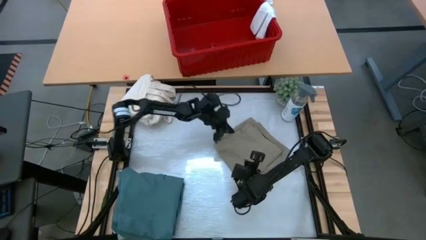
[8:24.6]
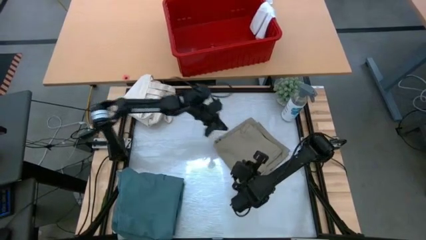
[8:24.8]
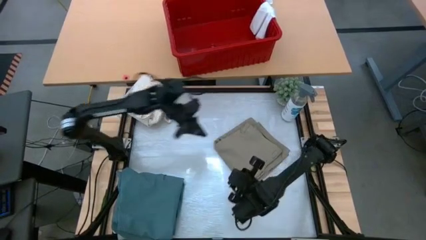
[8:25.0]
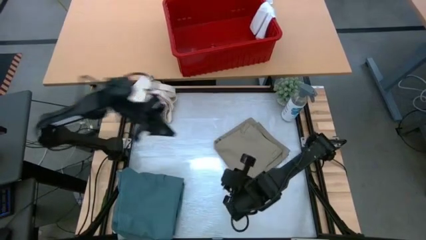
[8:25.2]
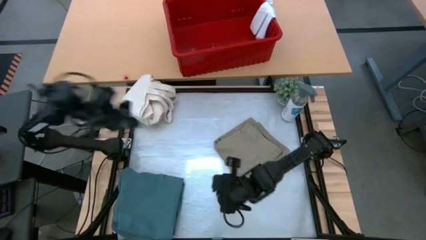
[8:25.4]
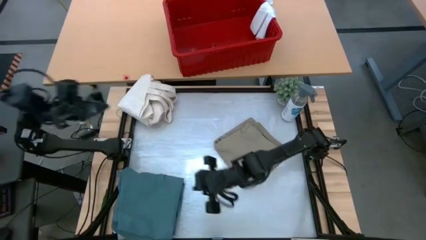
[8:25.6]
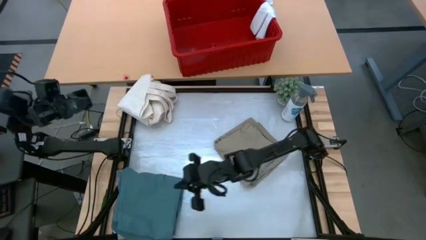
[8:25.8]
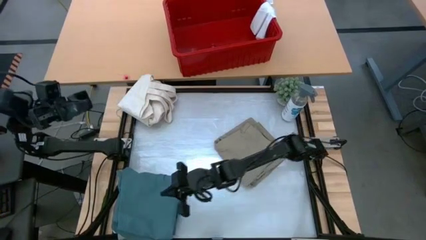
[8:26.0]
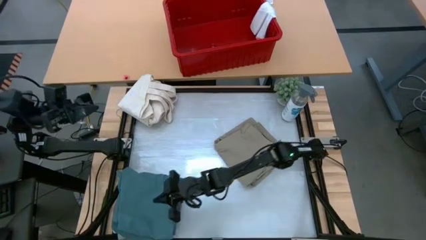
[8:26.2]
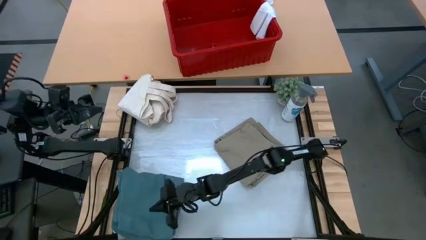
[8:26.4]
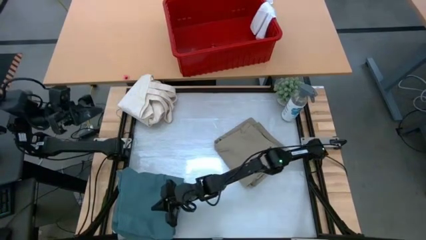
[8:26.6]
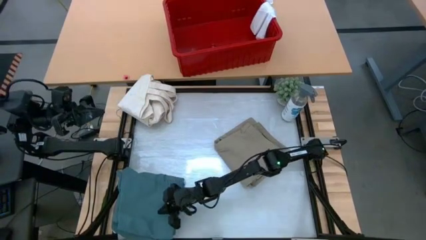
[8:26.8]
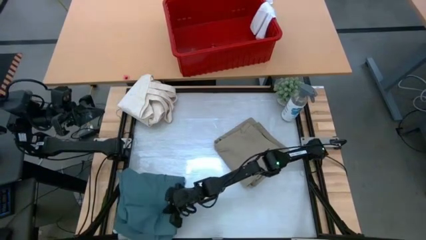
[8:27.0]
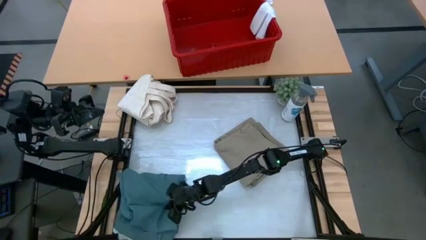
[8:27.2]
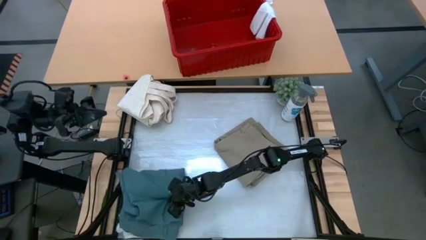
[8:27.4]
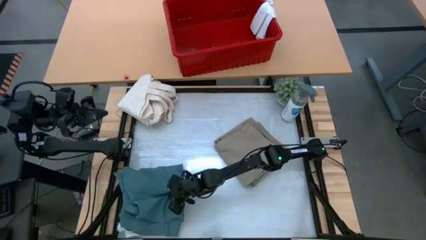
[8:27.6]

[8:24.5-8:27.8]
Task: Fold Laundry from Bin
Adjust the stacked clothes

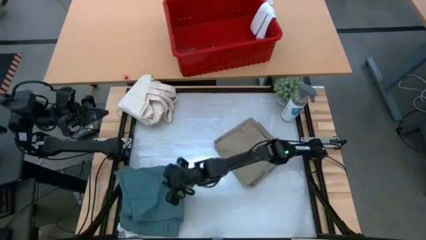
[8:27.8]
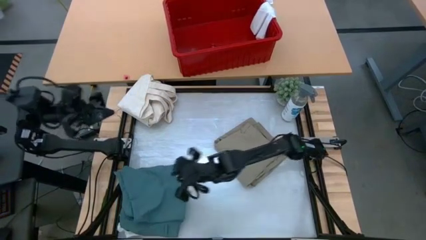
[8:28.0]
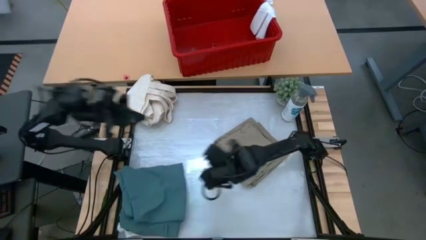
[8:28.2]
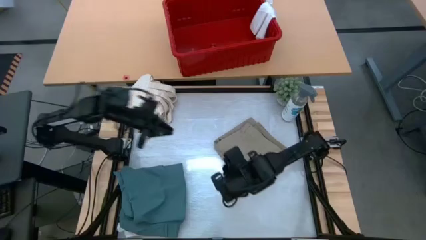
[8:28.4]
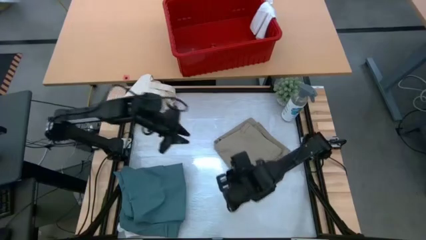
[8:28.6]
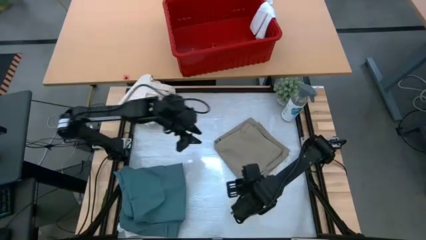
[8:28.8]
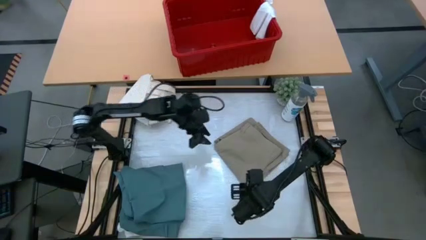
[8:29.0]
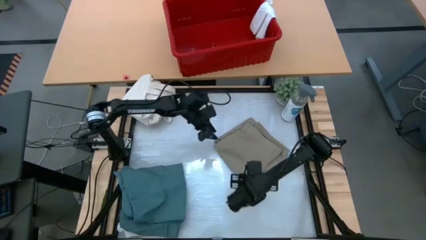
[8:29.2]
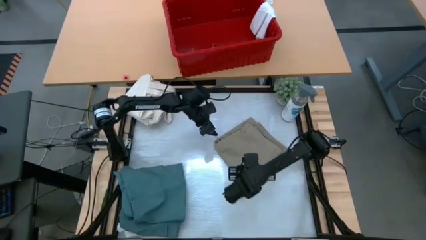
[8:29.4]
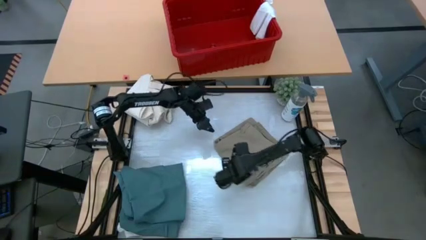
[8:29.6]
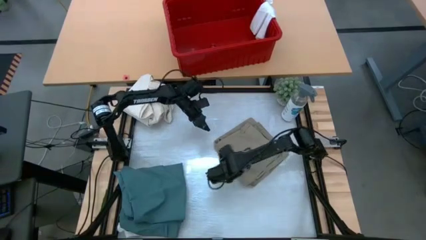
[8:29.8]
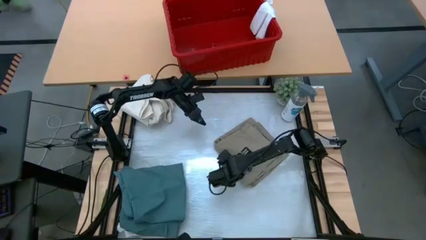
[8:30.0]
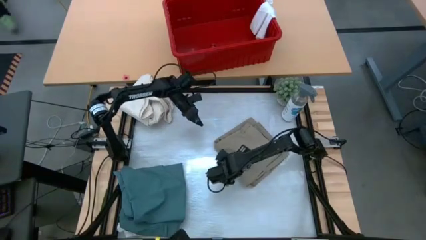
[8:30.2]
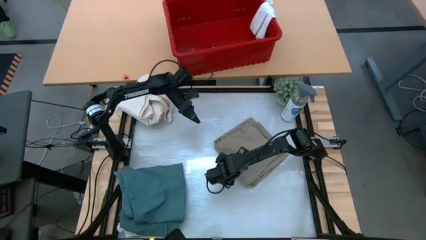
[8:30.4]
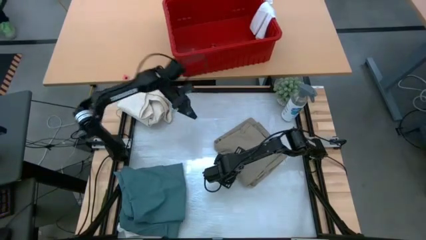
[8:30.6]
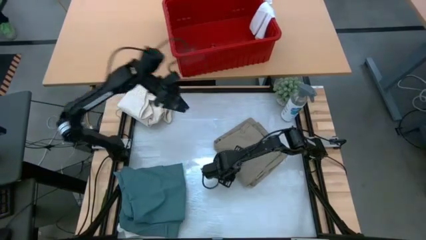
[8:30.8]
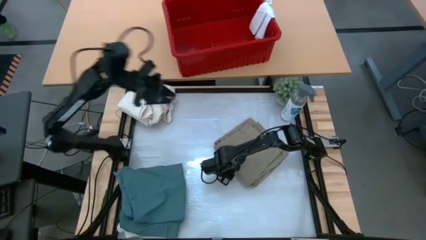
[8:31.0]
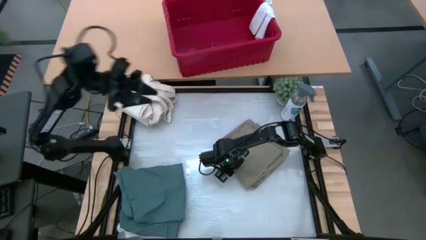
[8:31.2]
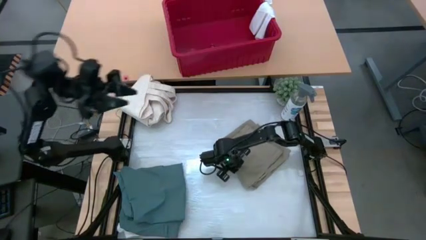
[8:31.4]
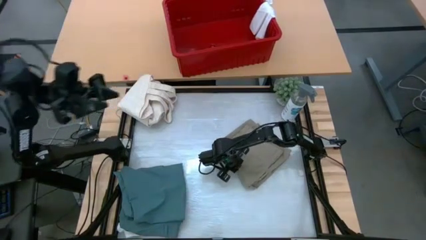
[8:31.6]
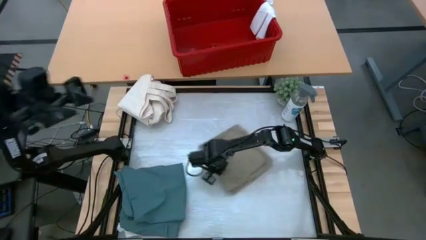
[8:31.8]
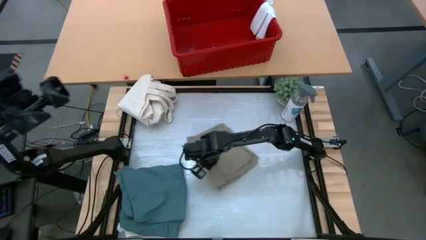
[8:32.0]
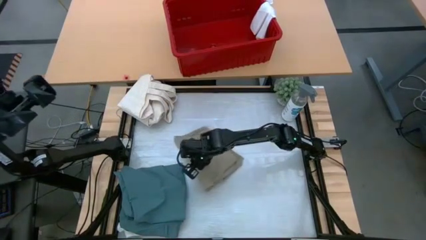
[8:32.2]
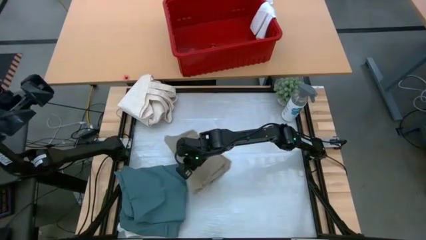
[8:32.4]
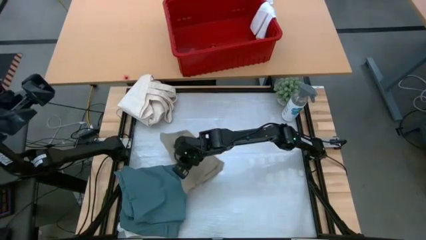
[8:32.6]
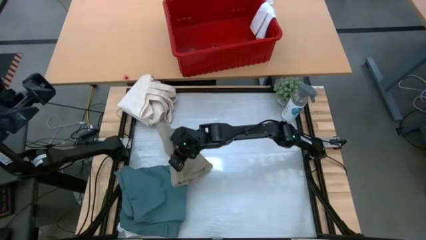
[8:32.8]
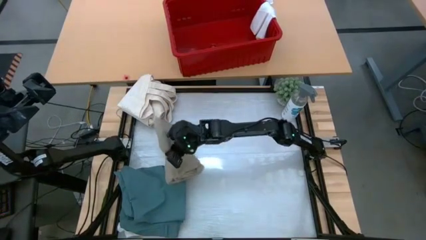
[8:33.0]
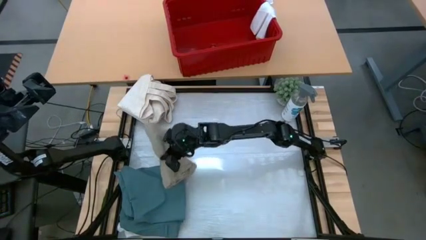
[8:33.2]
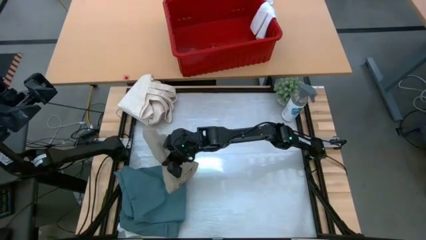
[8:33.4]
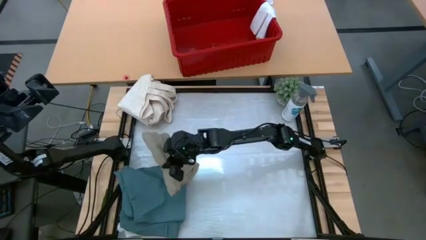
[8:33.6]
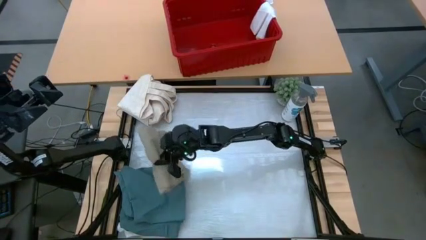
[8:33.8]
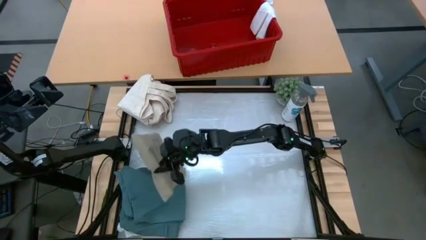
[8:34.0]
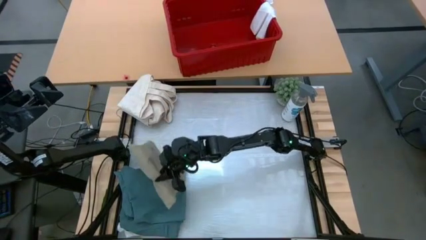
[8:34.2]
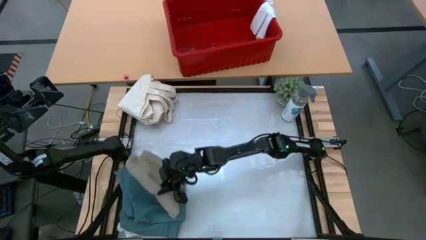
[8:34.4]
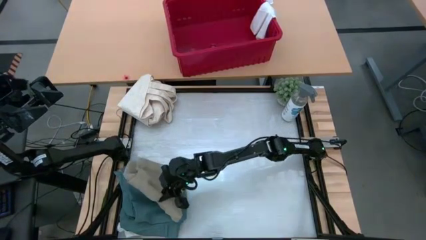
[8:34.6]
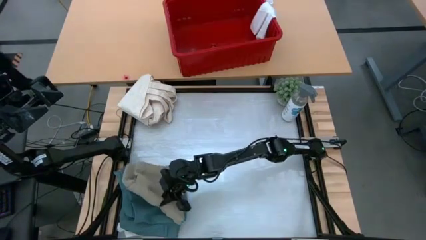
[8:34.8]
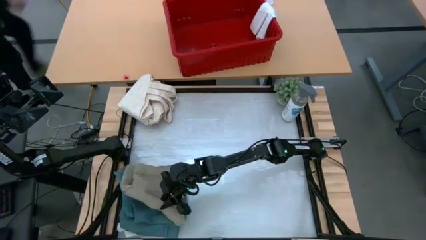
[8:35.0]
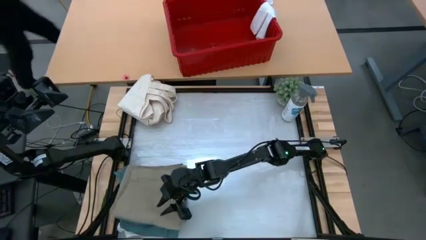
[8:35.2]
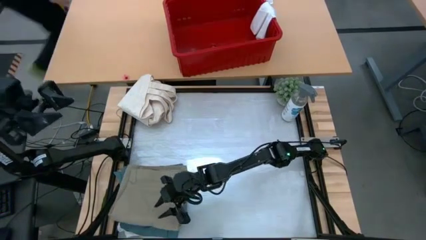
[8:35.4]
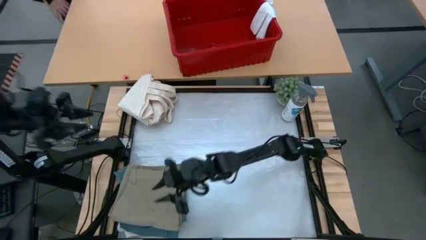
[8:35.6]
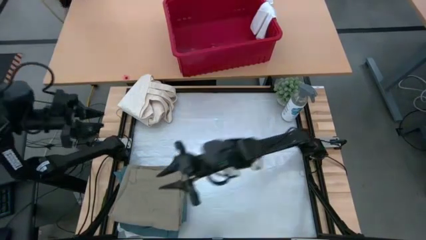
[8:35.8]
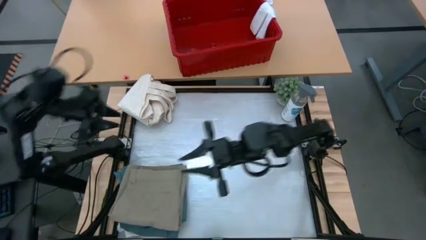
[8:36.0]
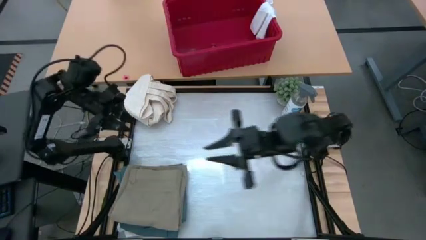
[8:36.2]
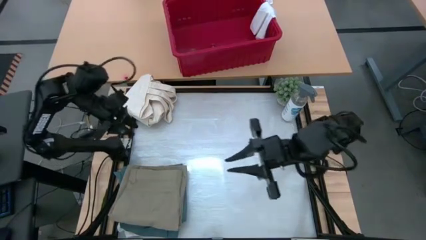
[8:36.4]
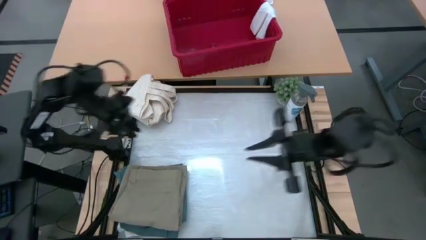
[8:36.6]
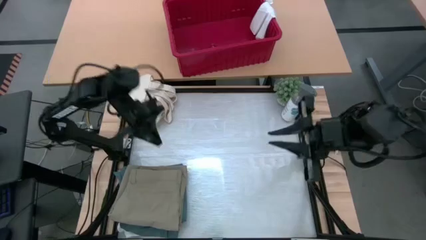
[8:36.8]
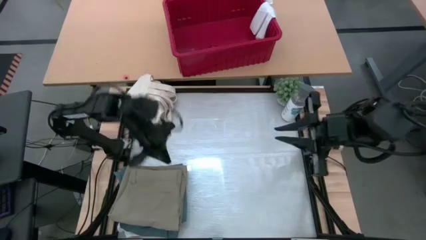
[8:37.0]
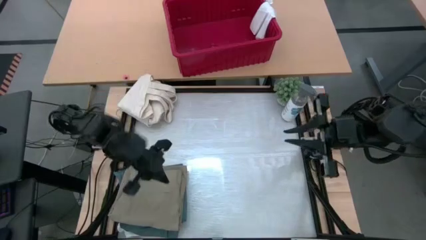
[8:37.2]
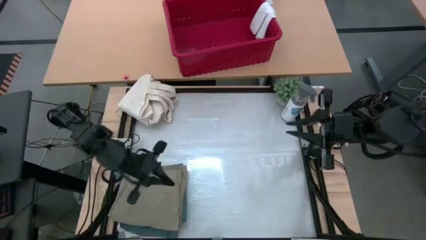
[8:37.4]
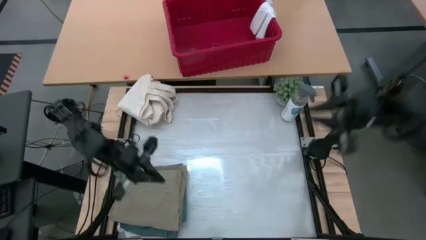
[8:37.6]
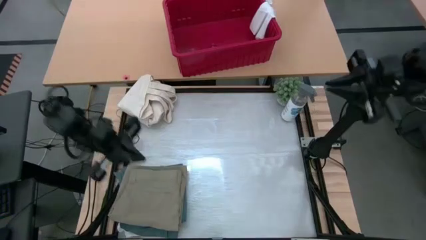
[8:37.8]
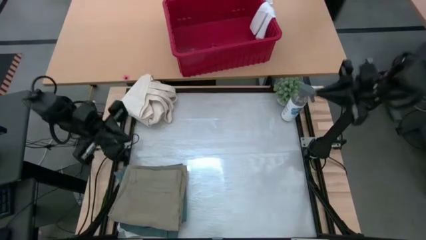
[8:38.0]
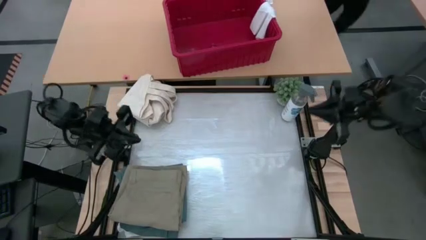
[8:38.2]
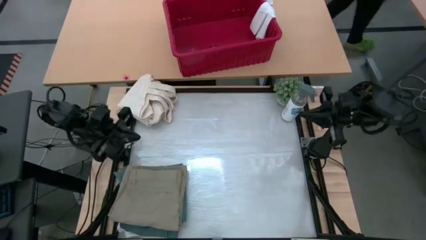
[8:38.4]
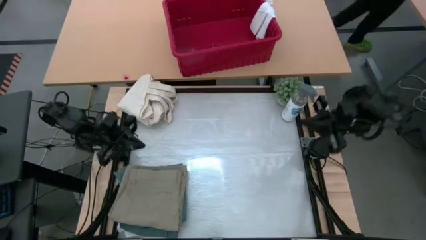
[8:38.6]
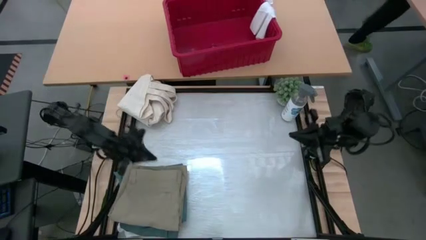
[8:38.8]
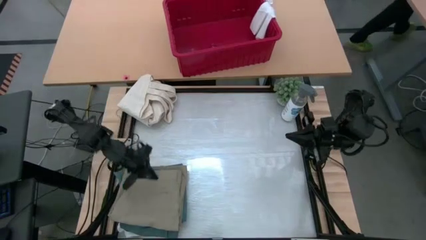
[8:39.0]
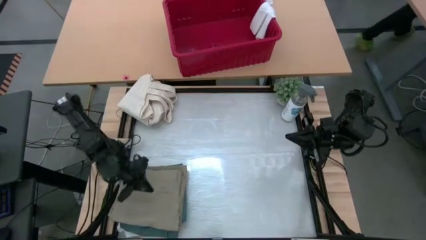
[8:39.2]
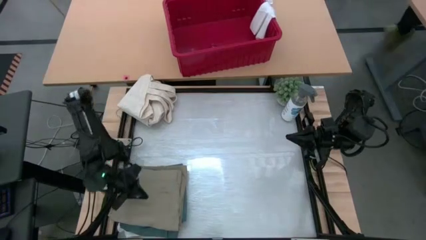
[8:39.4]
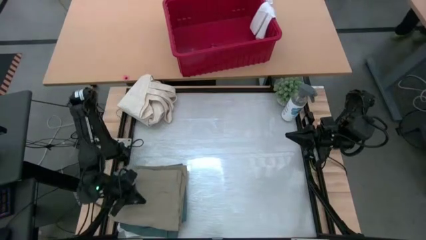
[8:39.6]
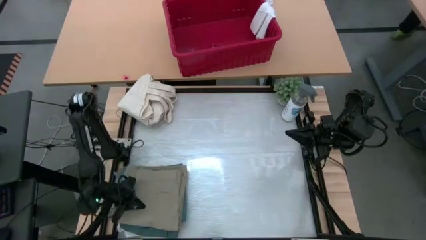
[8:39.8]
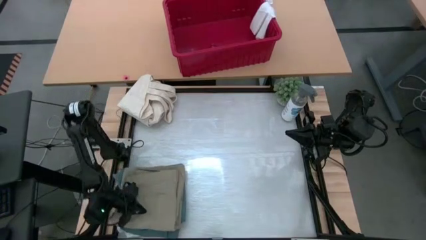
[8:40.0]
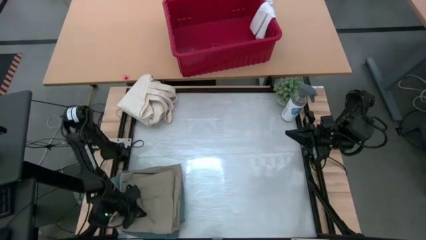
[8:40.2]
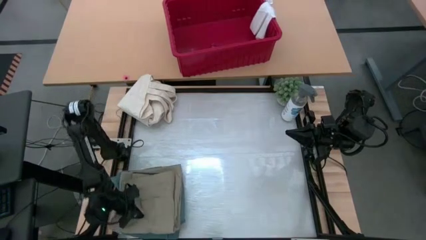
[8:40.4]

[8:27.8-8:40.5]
Stack the brown shorts on top of the white shirt

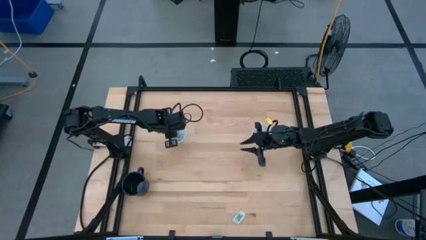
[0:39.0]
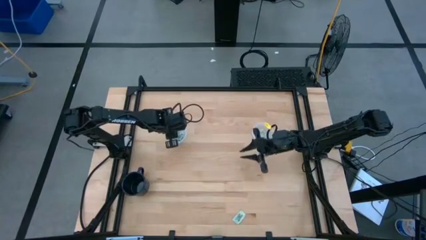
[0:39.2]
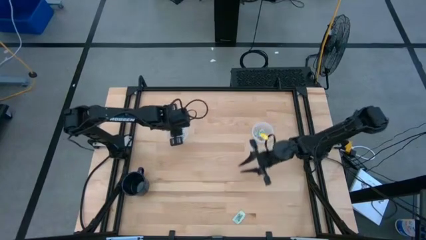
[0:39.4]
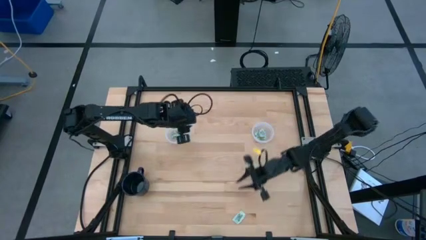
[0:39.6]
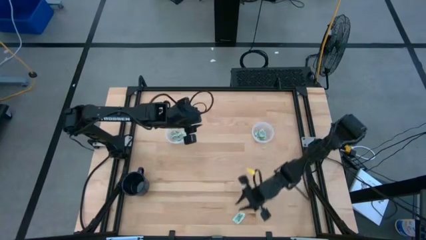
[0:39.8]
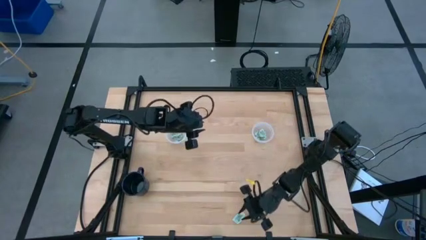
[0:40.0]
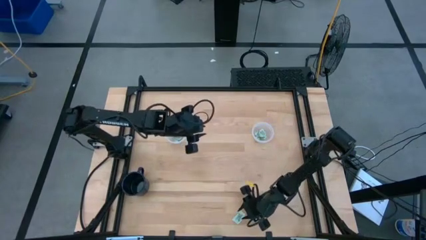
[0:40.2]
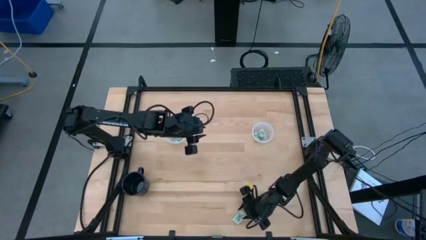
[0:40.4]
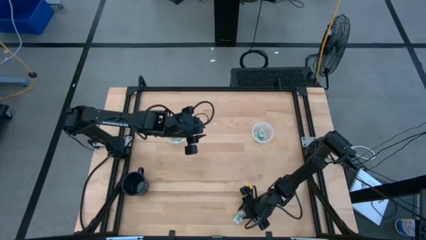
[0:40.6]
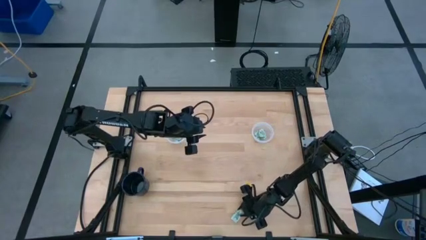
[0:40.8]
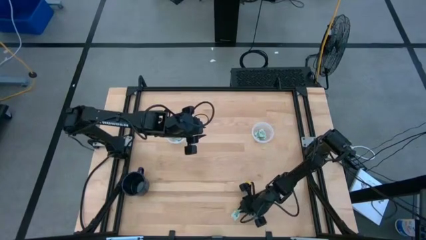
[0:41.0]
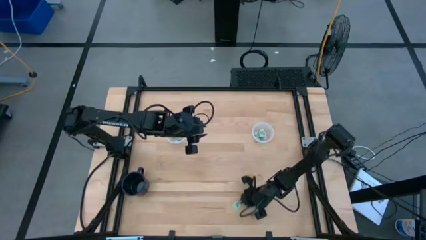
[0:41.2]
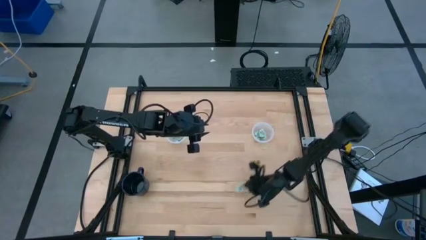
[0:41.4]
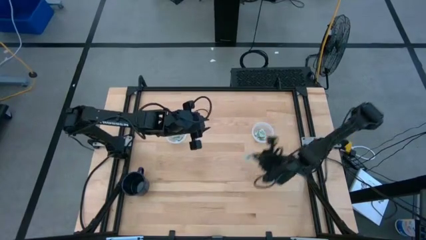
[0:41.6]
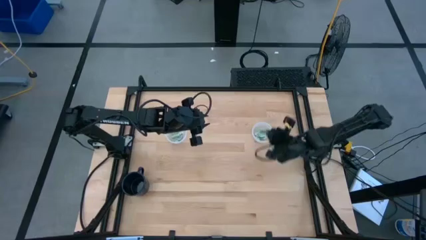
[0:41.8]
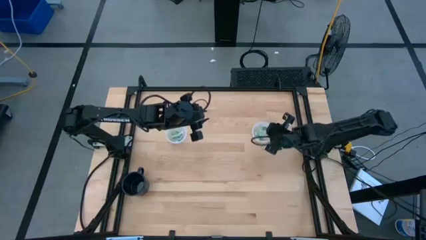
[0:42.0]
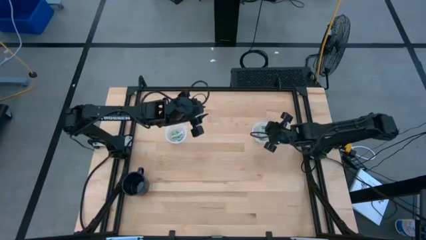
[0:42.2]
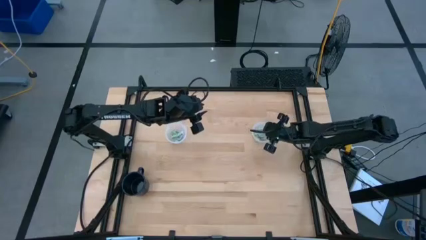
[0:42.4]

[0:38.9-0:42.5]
Task: Pick and place Stevia / Truvia into bins
Put the stevia packet into the right transparent container
